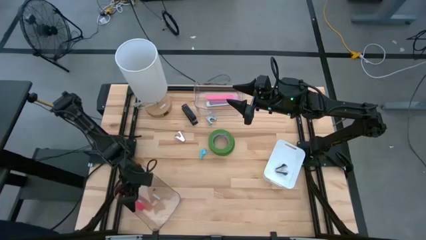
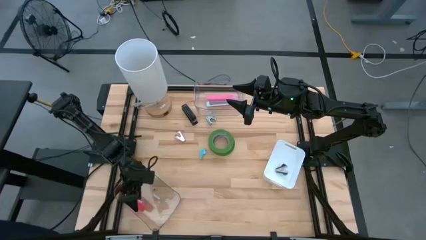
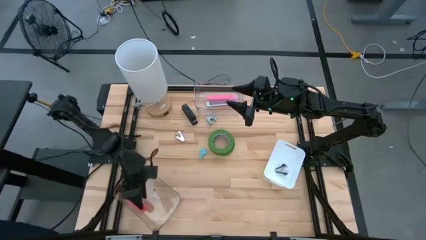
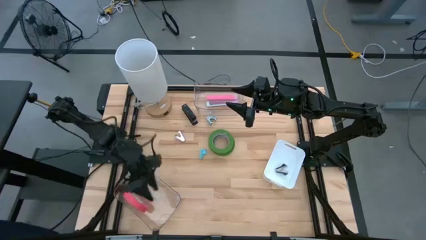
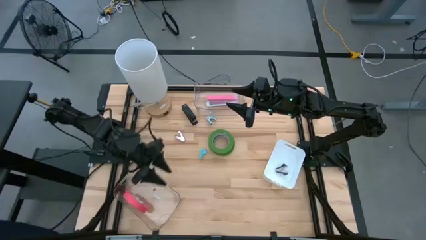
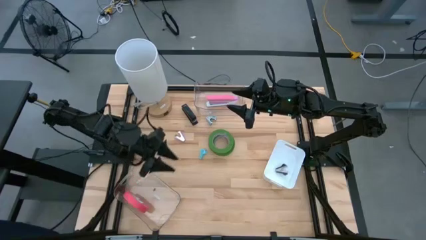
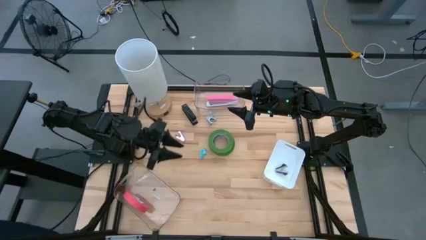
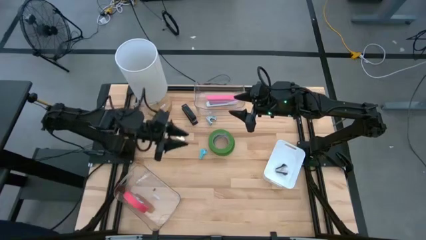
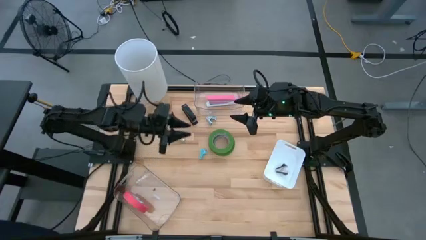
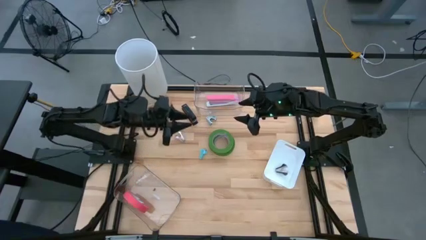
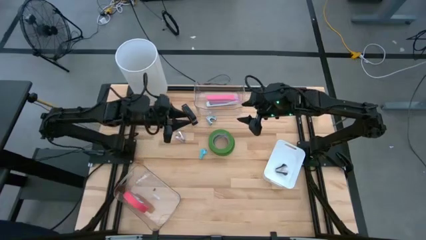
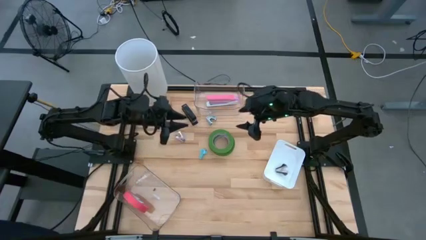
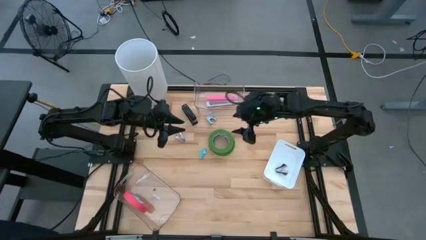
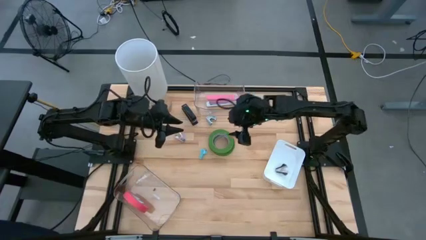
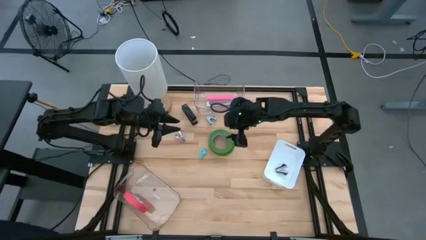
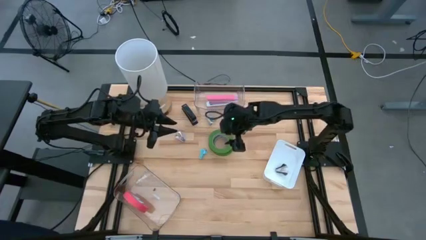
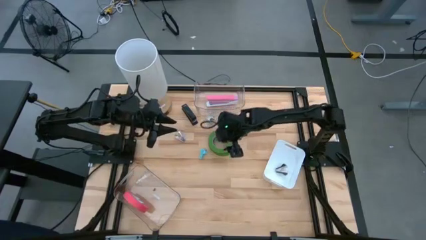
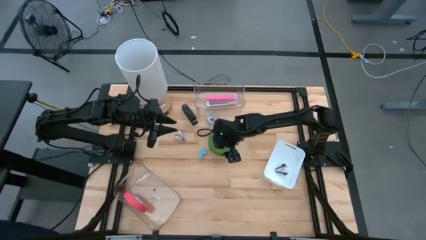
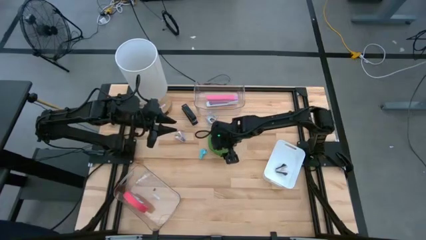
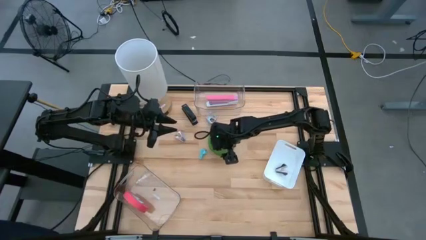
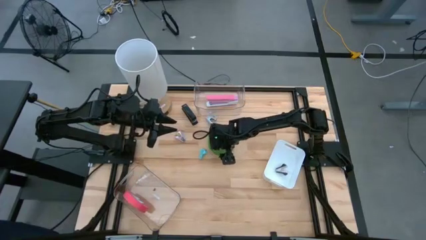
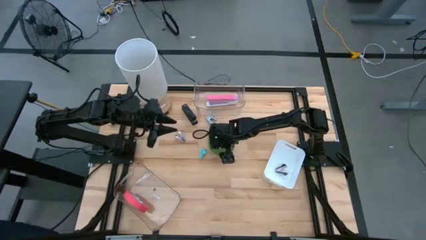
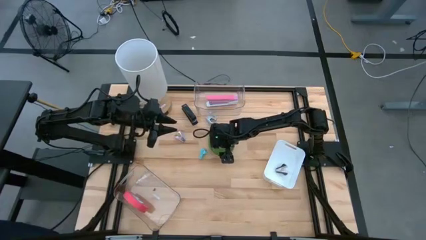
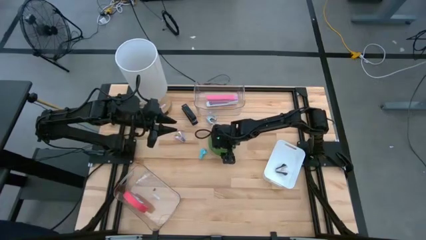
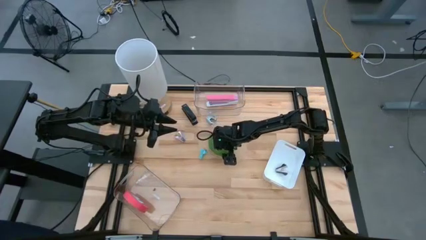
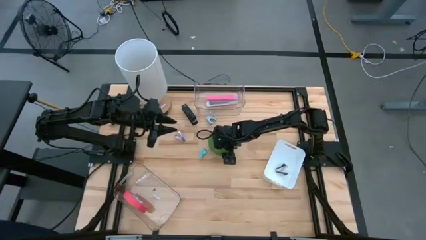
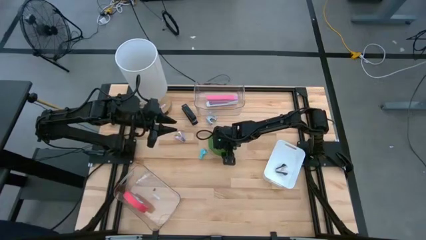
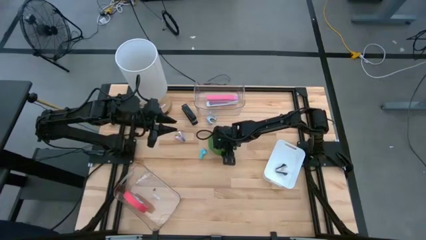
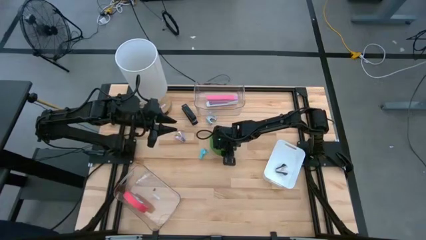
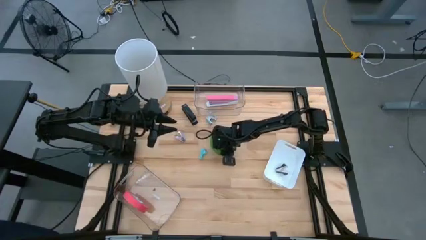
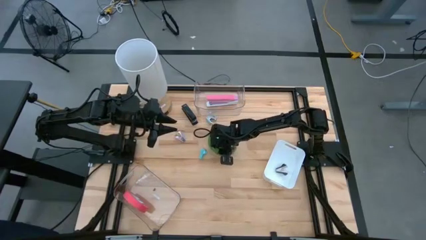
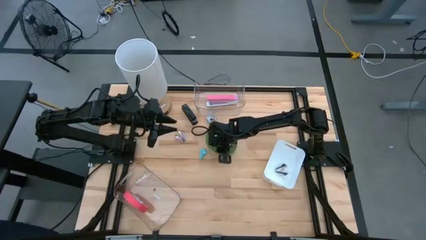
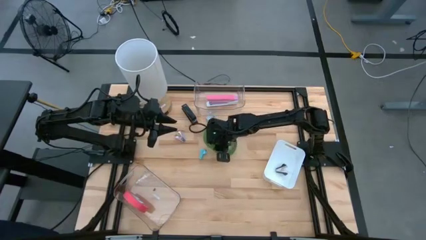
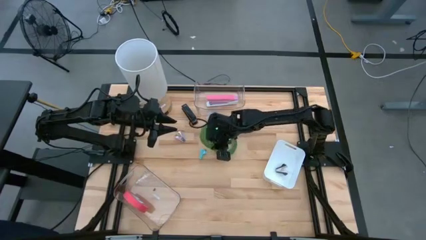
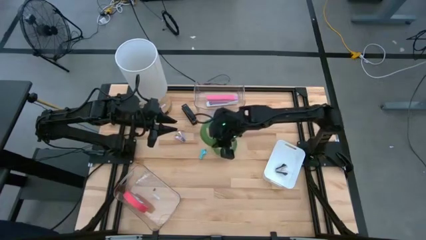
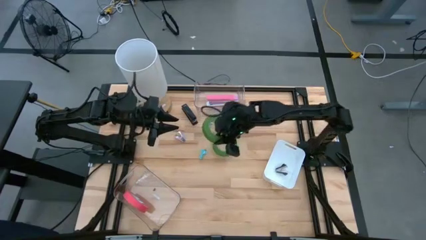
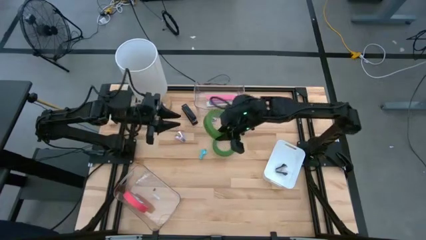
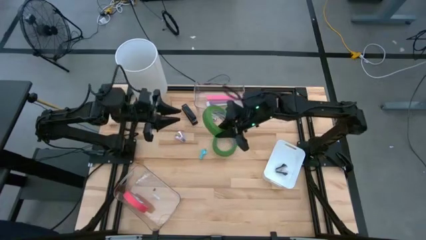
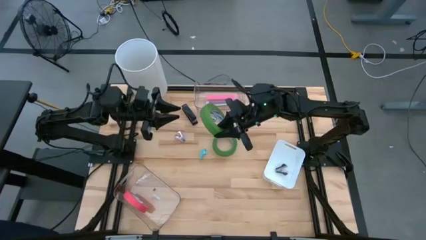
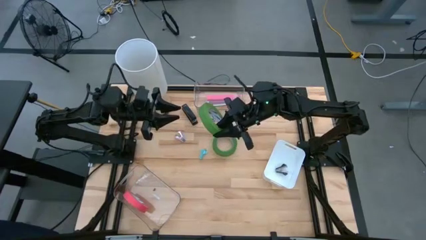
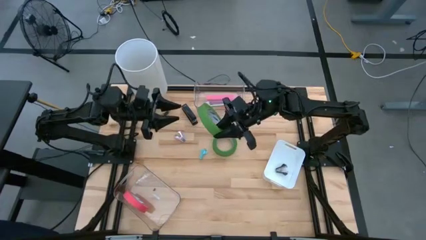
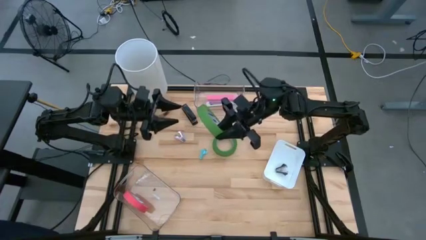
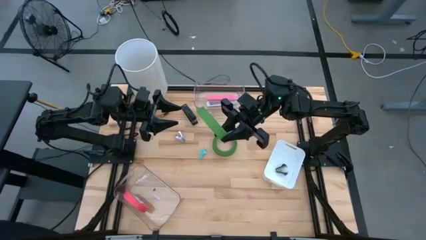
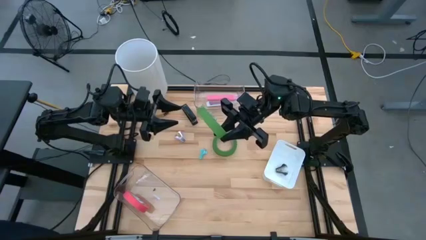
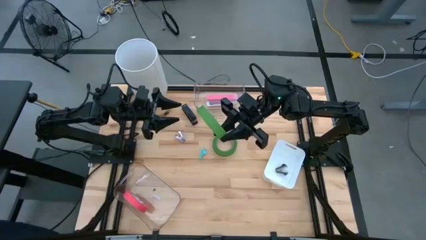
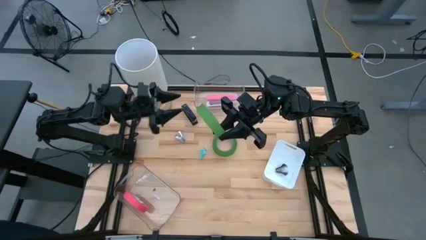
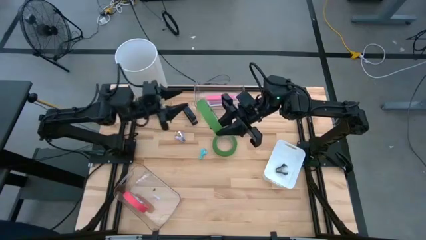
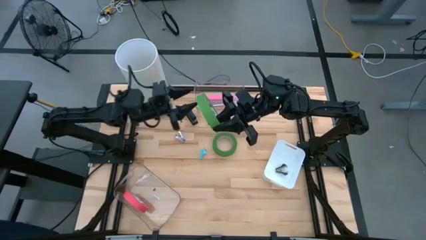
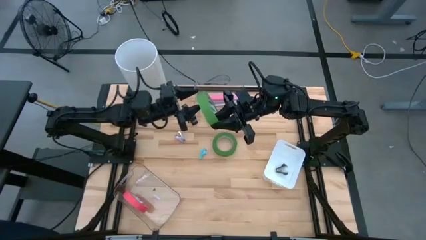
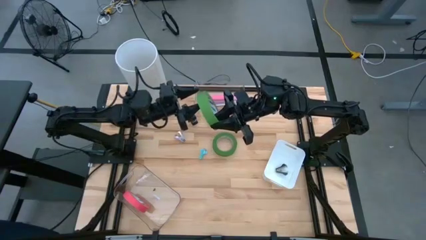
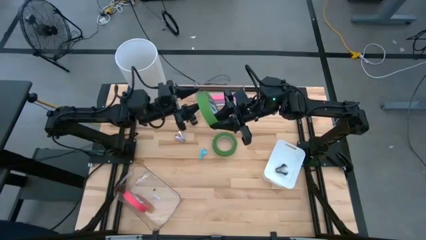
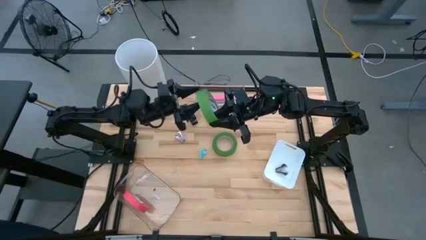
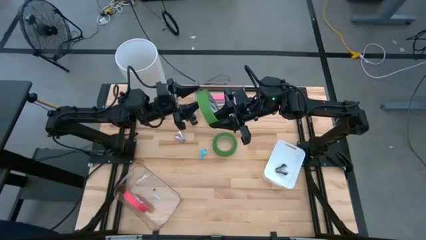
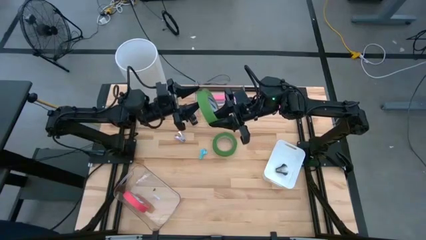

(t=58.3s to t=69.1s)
Task: Pick and place Stapler, Stapler remover, tape
Put the green tape into the bottom transparent bin

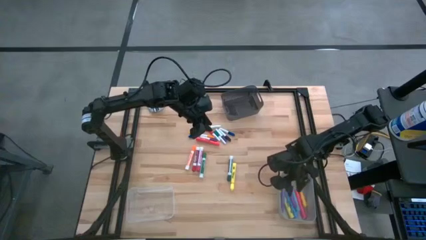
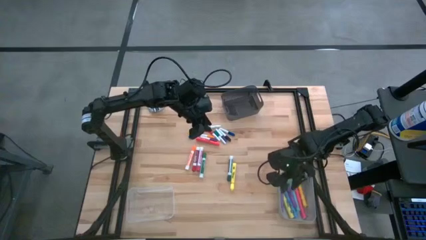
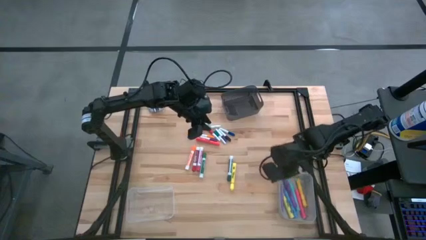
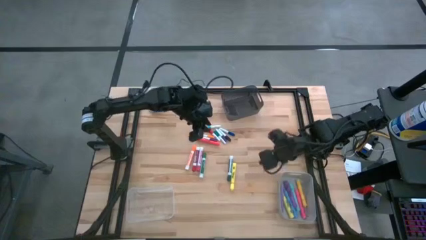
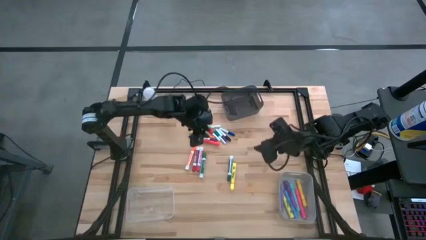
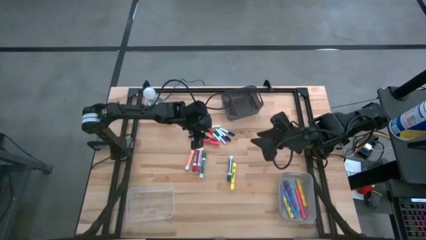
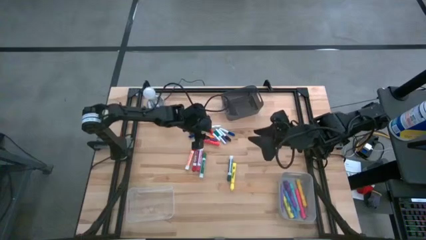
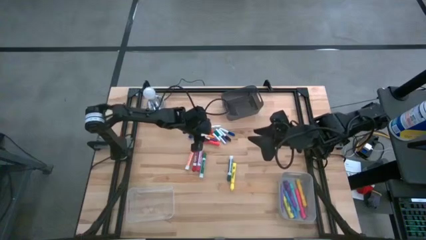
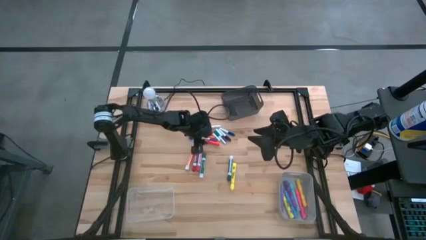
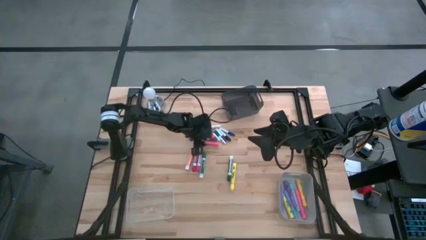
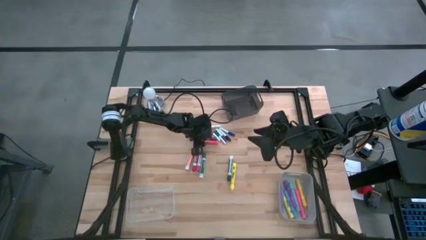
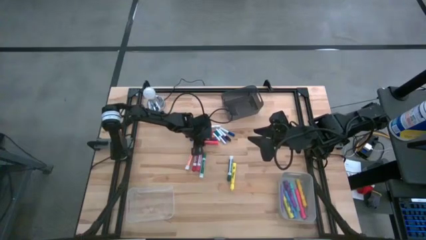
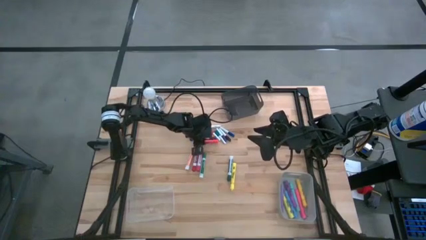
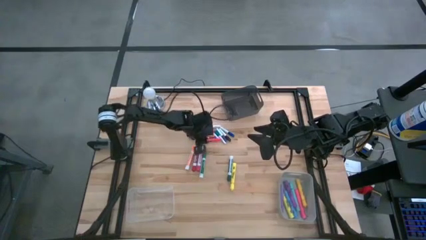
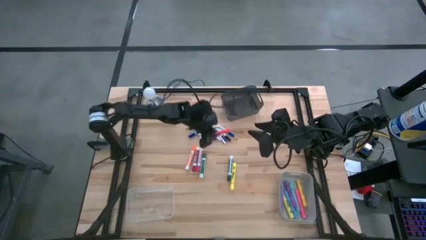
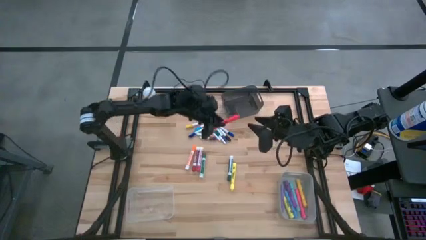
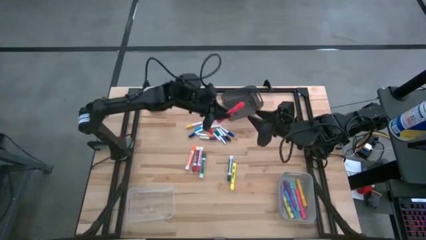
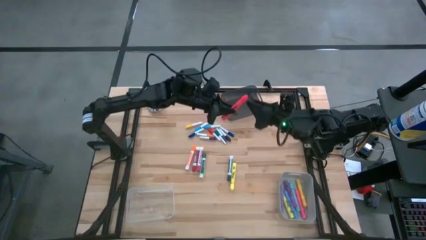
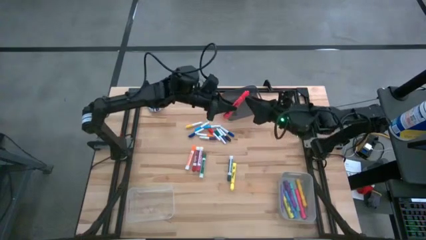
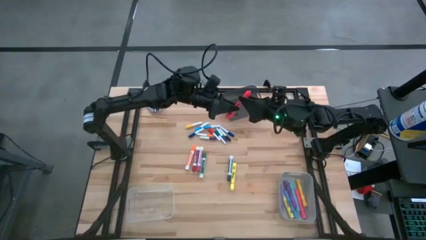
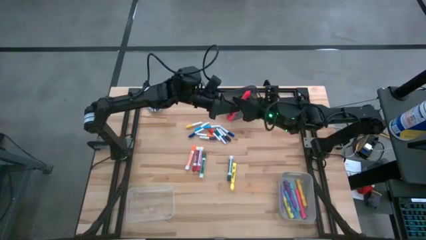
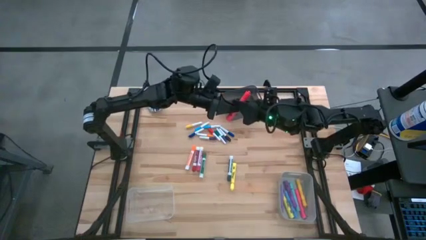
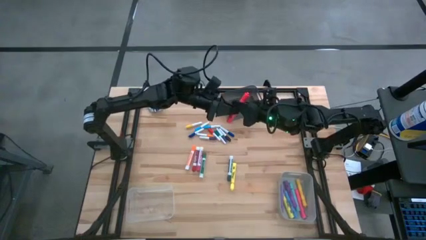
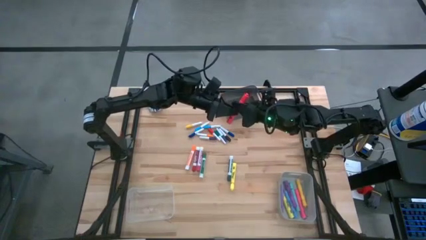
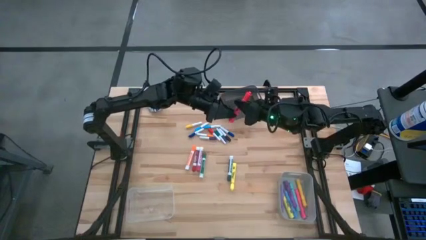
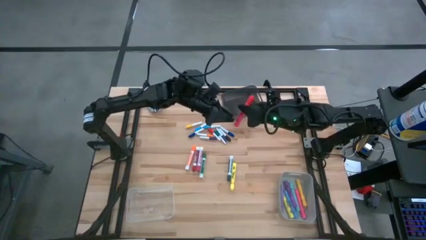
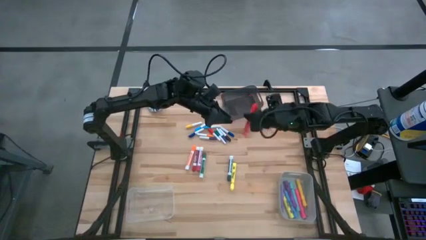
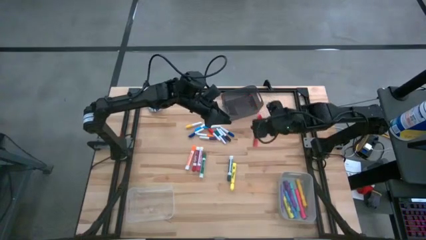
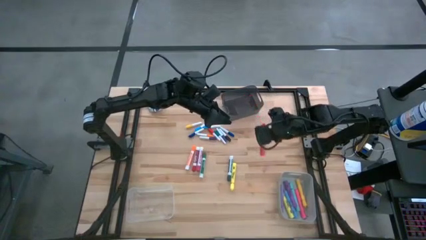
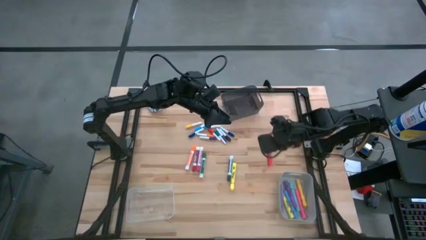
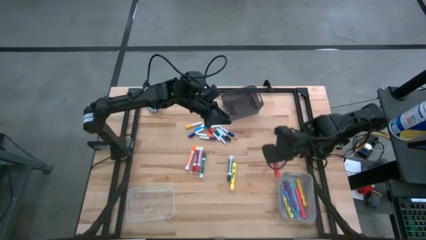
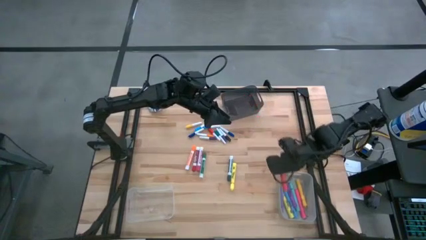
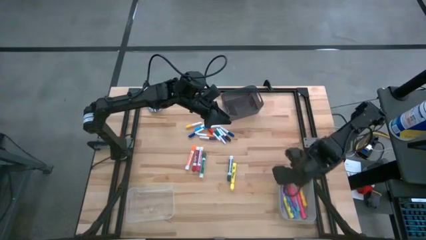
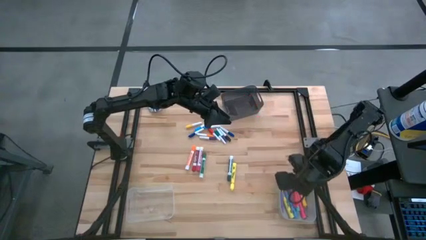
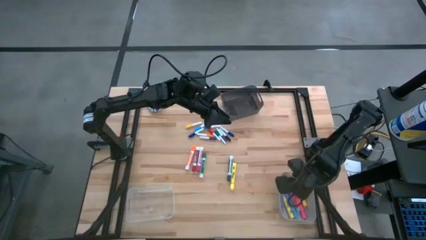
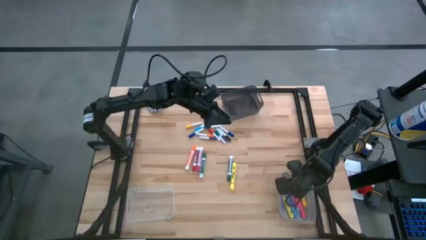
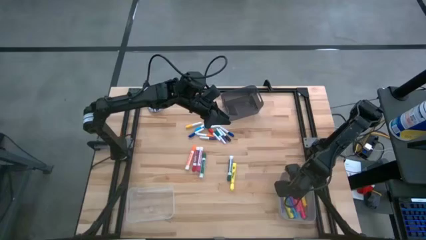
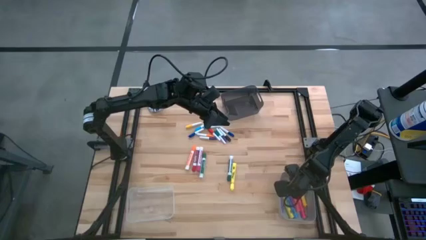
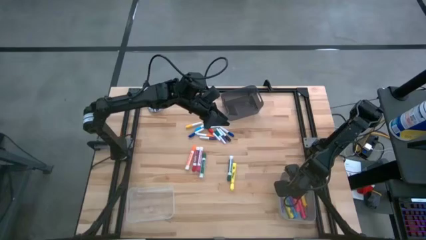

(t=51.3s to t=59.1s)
Task: Pick & Place Markers
Put the orange highlighter pen into the gray bin
